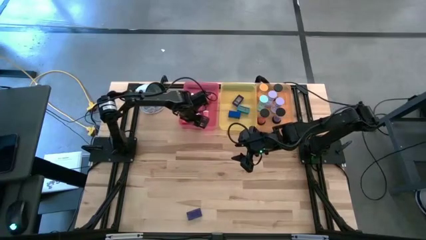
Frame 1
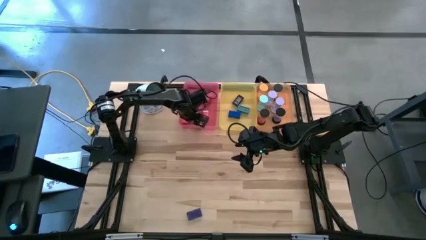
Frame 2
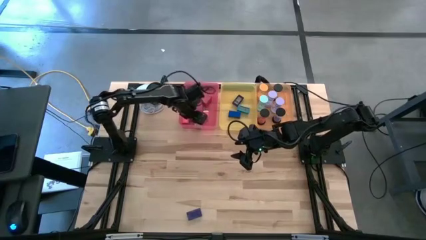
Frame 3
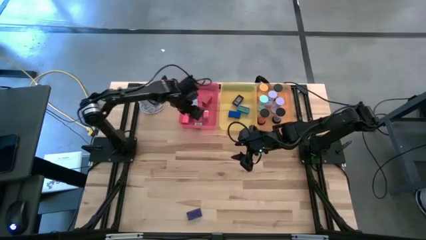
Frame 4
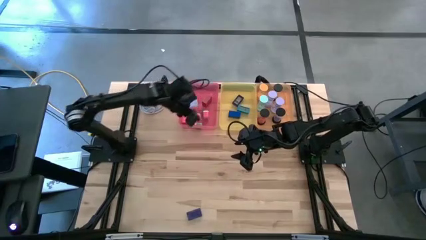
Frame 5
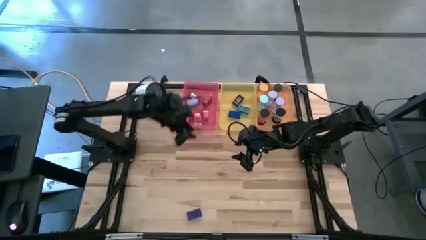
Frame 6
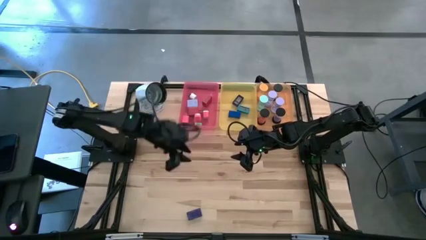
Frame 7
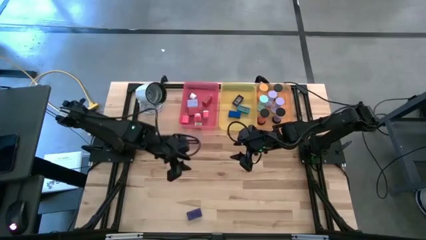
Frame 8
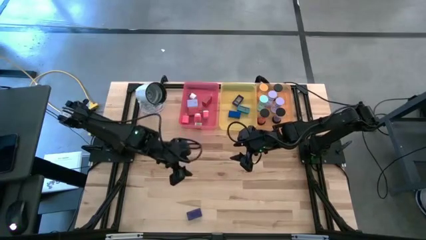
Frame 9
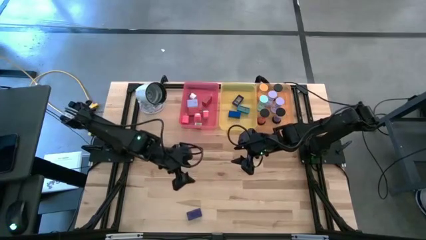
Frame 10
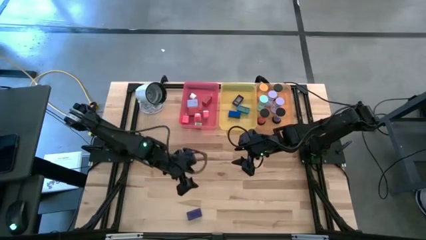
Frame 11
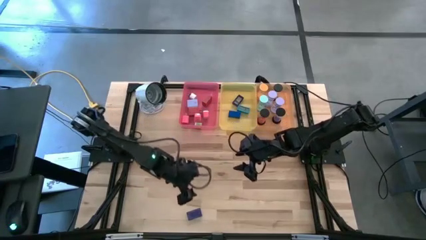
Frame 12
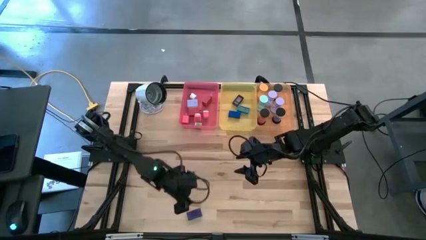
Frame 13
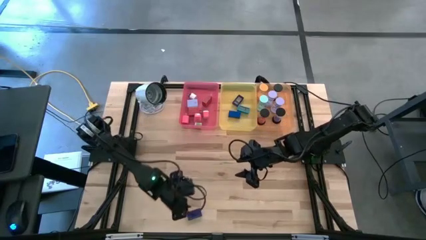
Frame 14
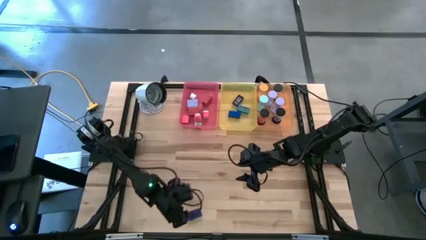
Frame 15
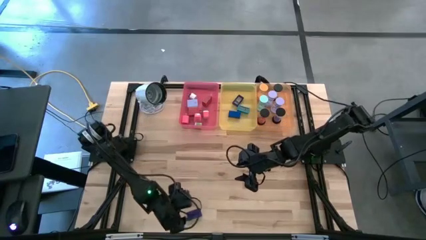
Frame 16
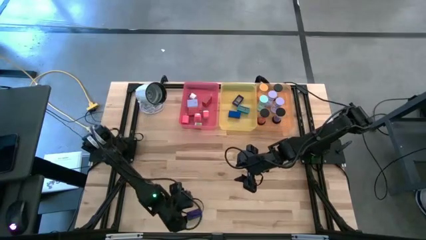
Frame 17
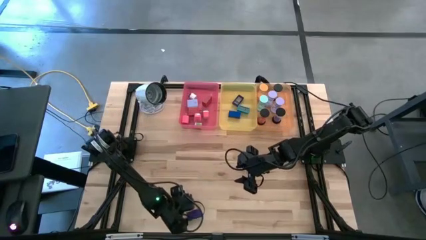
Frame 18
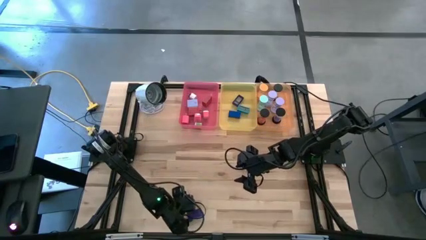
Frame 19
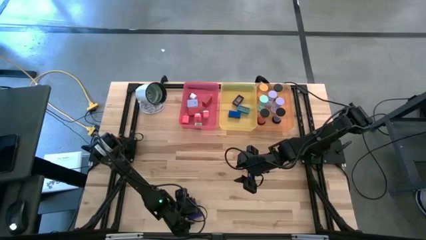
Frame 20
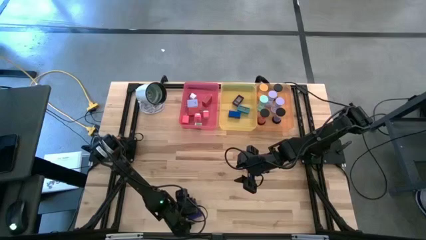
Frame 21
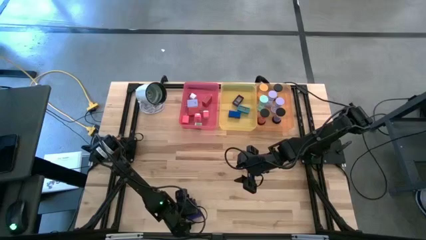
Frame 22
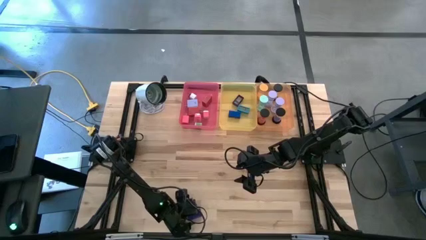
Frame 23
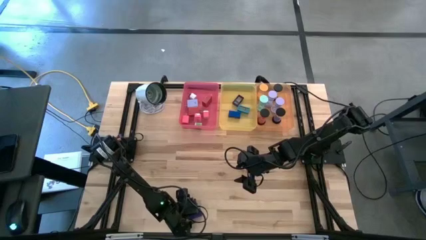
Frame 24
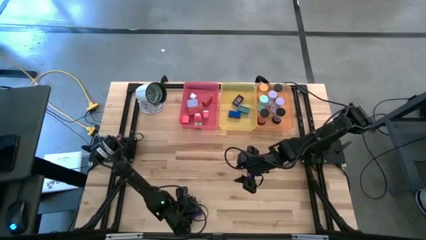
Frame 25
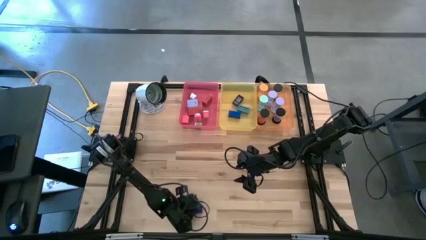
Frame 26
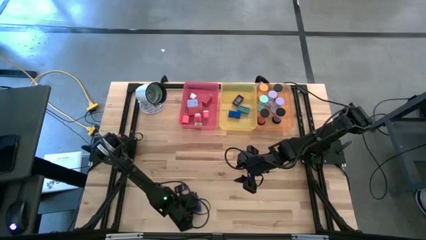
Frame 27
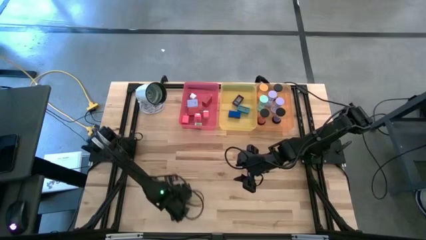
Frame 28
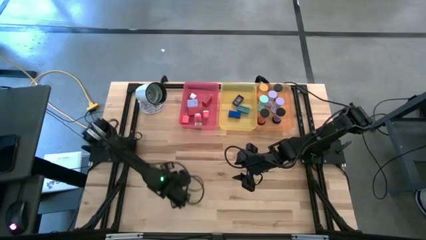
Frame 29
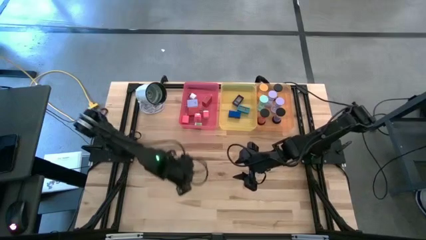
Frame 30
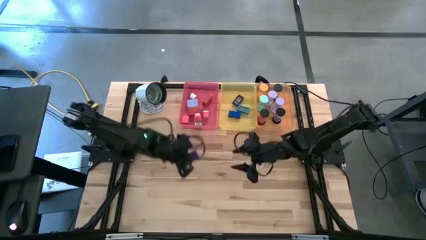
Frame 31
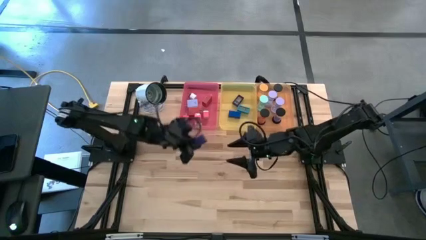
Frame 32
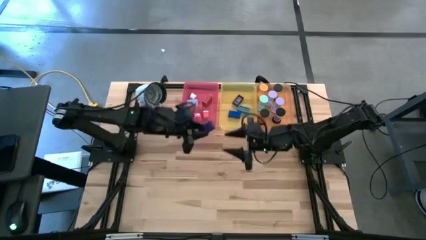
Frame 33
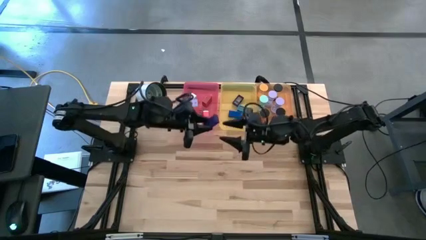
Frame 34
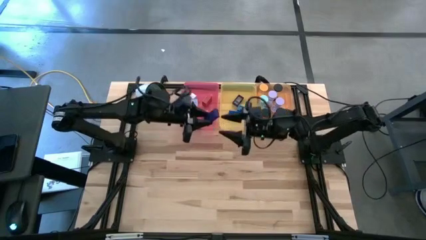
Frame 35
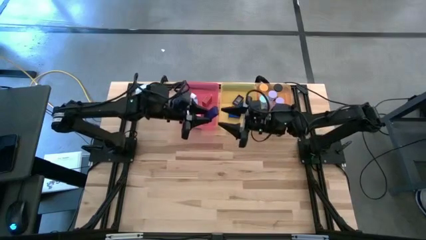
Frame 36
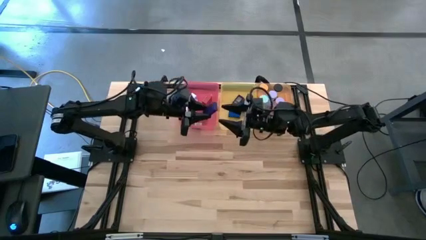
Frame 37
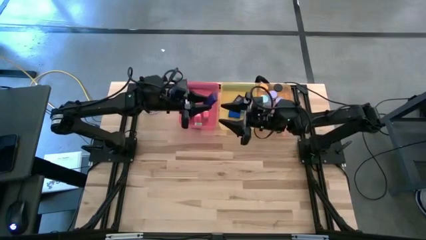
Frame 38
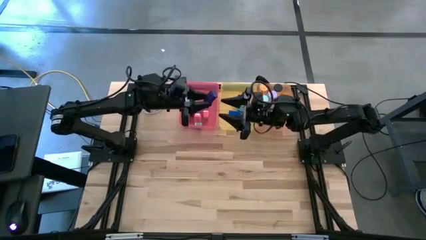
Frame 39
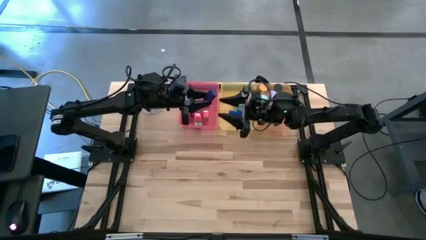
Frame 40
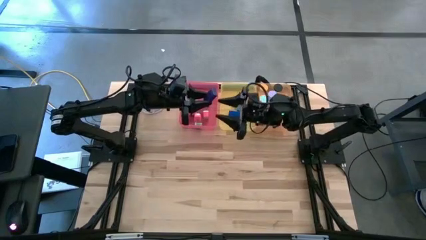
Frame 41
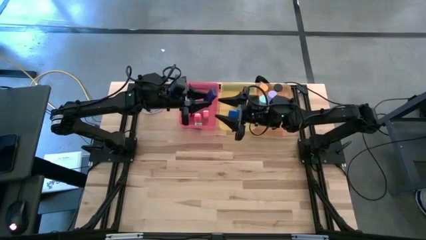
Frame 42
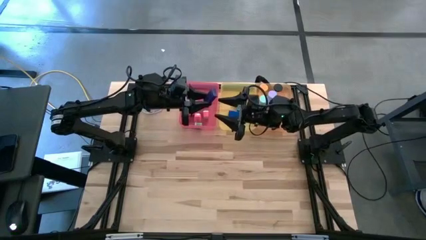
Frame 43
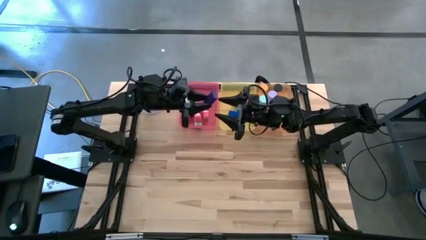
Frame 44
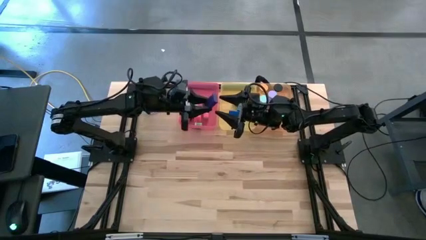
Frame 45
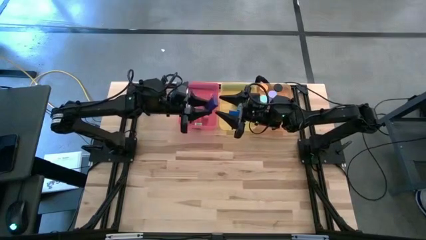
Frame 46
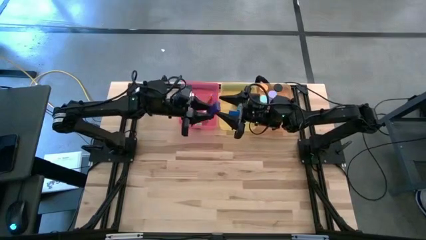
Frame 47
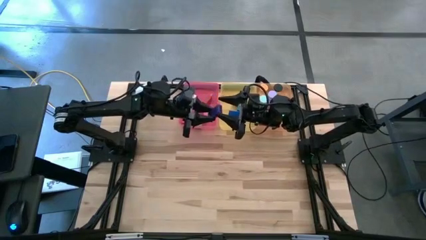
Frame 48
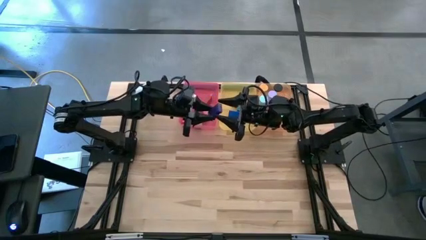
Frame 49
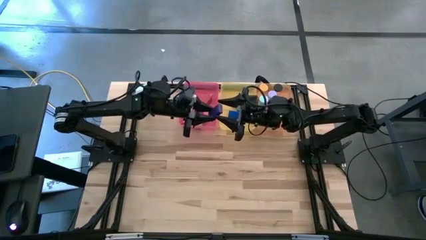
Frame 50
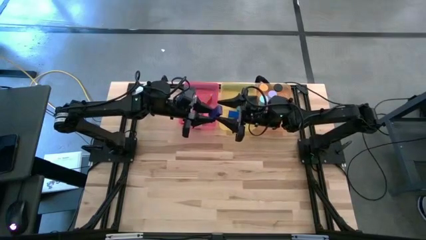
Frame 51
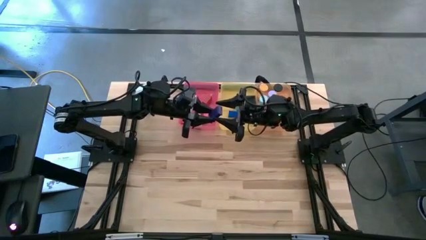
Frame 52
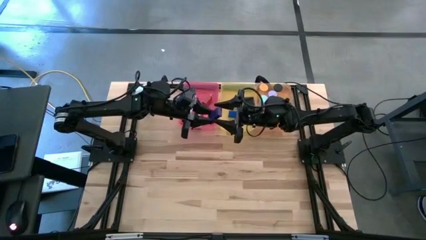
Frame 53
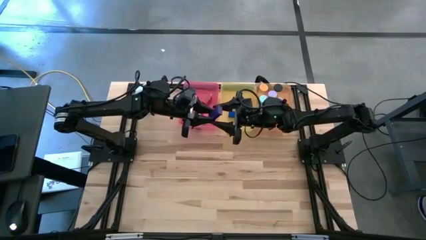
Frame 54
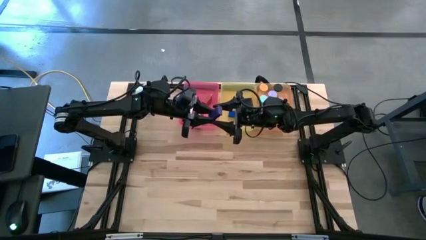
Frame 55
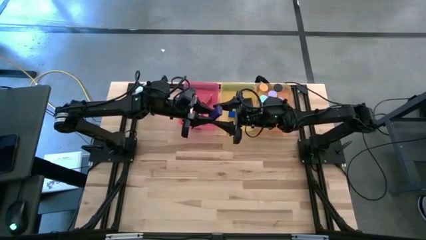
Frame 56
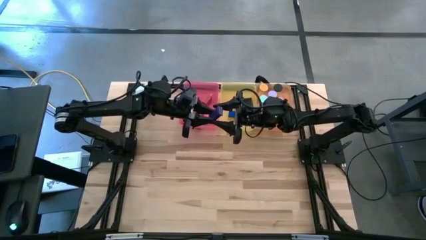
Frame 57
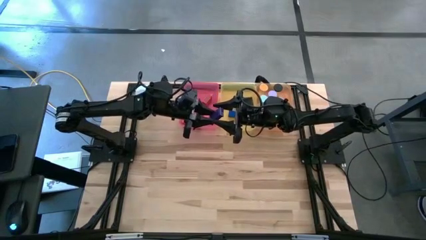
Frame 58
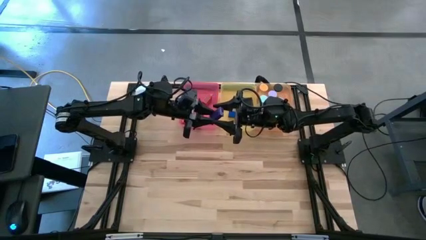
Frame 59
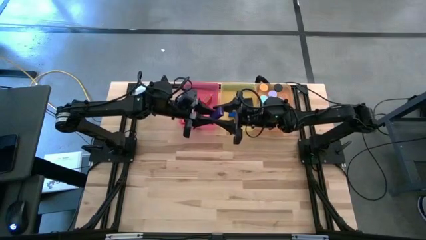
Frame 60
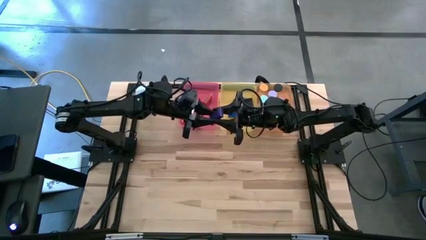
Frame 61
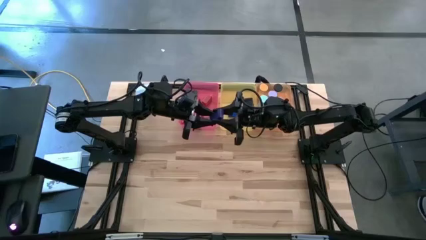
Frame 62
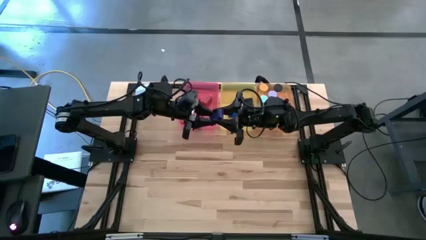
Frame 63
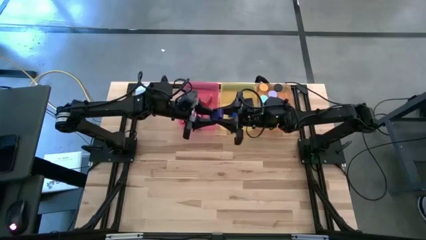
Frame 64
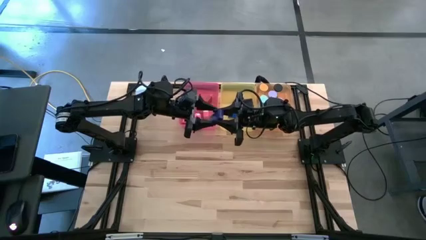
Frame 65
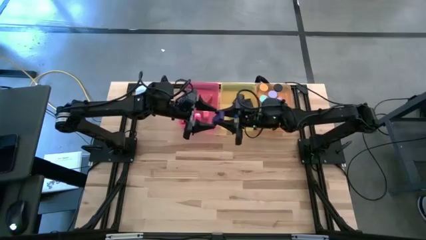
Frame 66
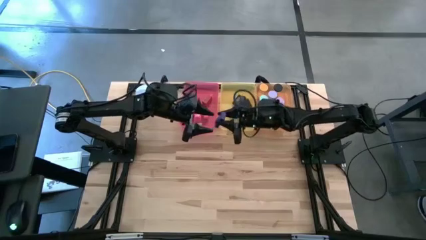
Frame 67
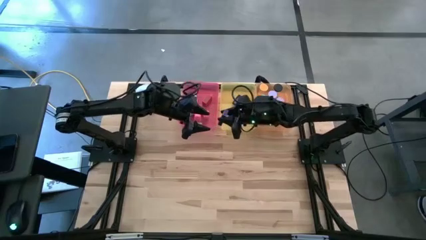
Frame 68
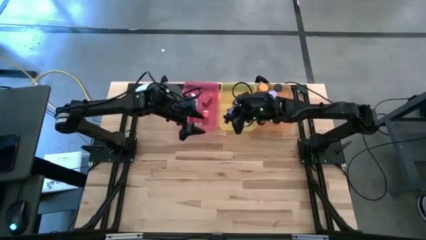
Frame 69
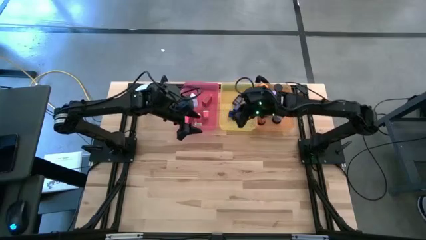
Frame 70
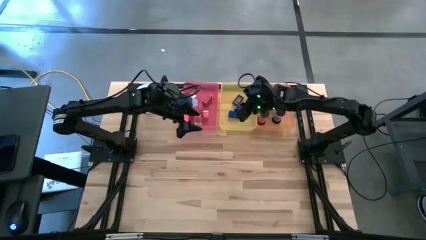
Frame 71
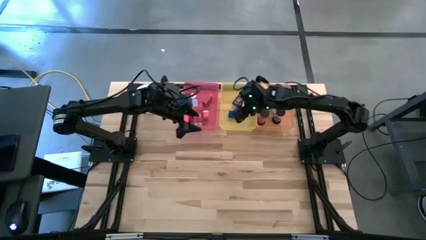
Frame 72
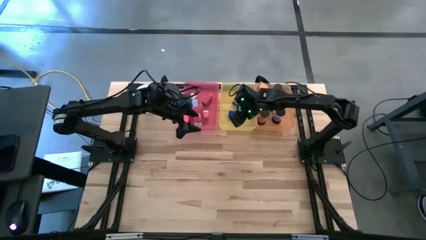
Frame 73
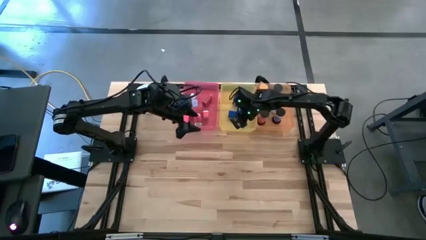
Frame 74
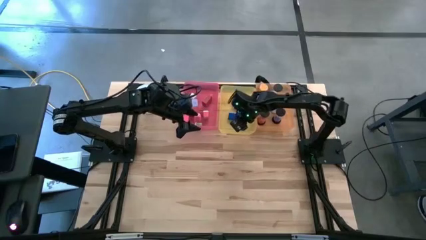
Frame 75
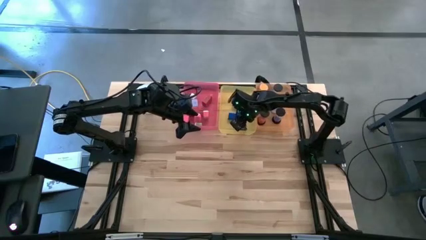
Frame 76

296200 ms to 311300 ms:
Task: Pick & Place Office items
Put the purple digital clock into the yellow bin

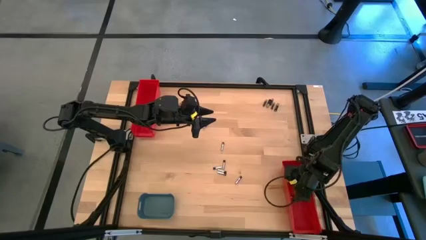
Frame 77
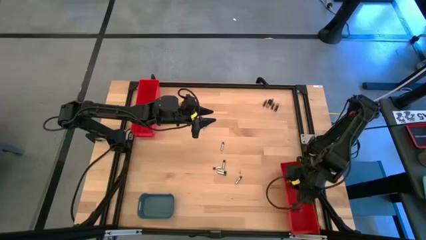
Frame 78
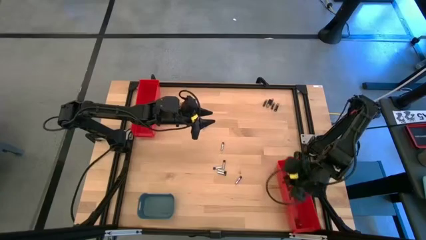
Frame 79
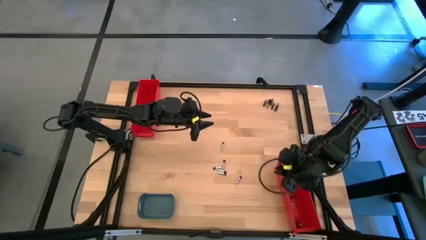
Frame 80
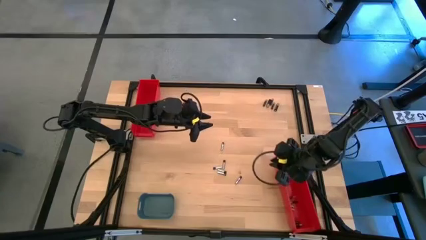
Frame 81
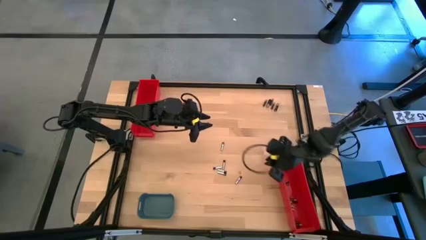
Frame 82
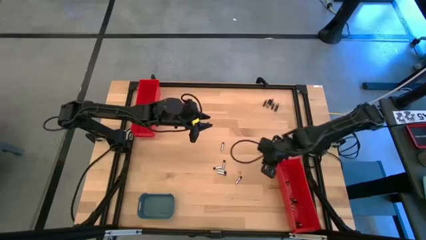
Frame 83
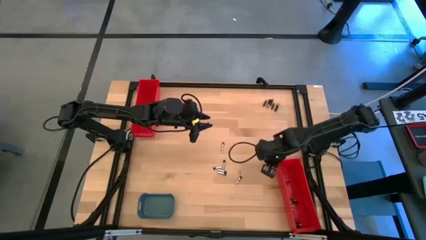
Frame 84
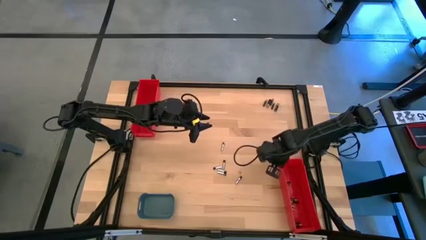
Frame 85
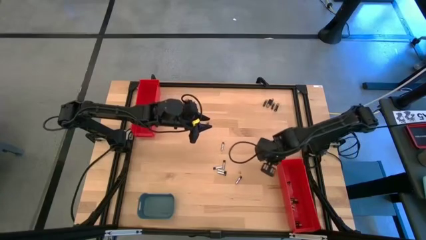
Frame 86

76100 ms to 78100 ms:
Task: Sort batteries
Adjust the bottom red bin
